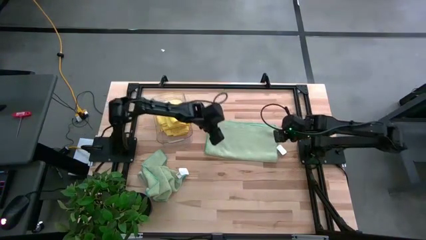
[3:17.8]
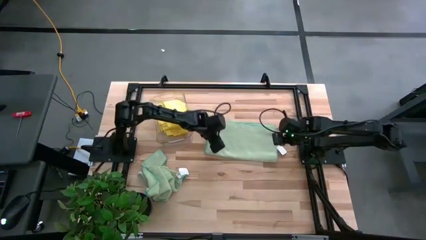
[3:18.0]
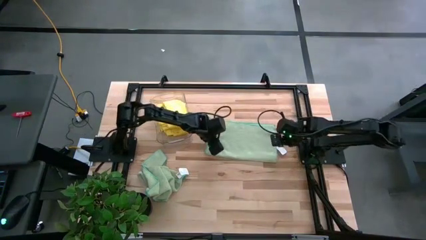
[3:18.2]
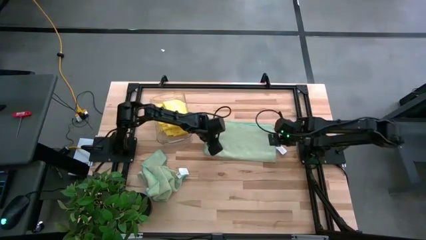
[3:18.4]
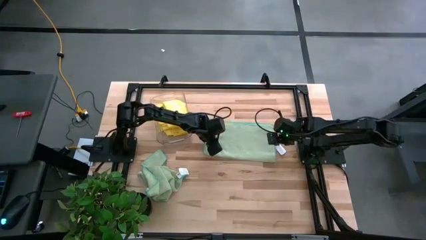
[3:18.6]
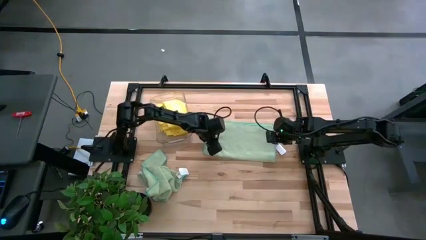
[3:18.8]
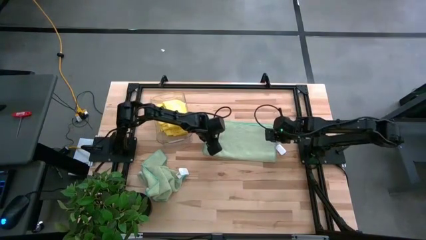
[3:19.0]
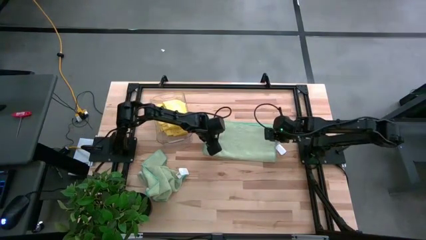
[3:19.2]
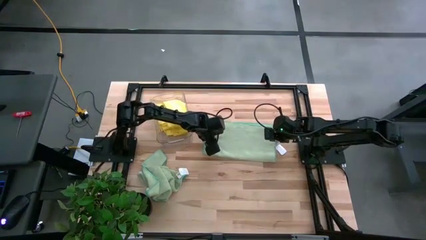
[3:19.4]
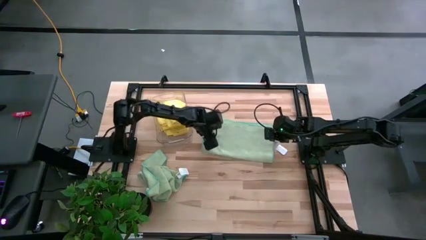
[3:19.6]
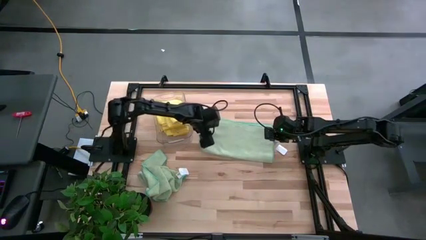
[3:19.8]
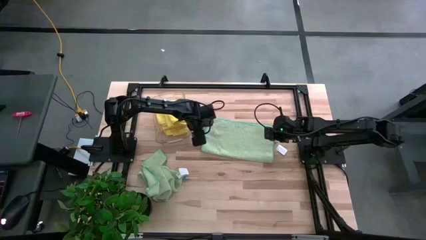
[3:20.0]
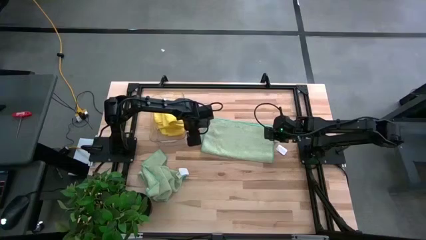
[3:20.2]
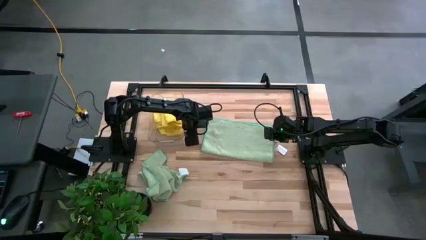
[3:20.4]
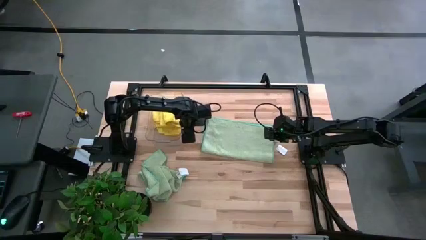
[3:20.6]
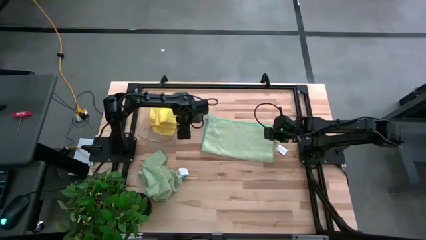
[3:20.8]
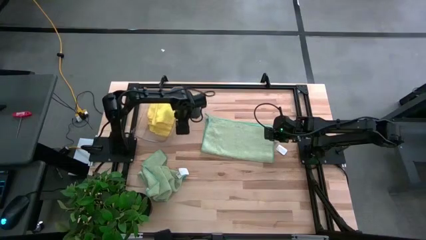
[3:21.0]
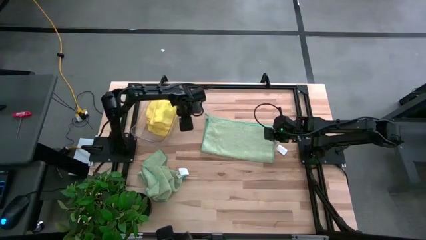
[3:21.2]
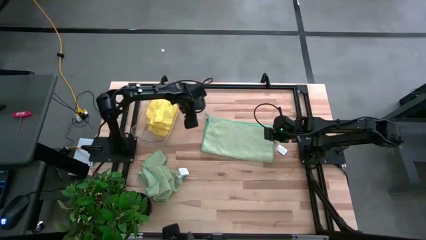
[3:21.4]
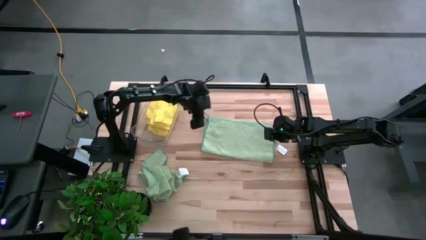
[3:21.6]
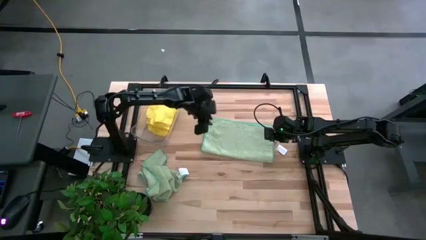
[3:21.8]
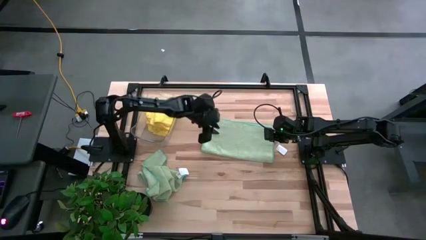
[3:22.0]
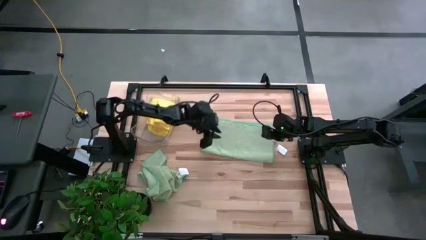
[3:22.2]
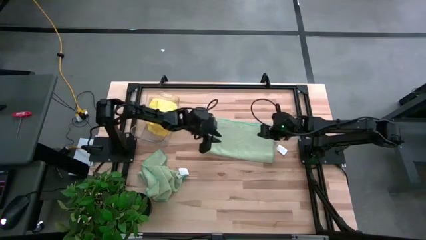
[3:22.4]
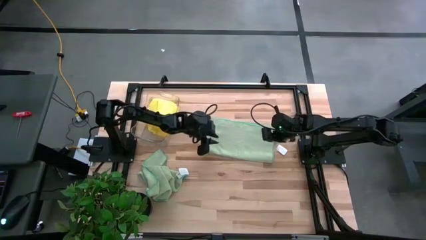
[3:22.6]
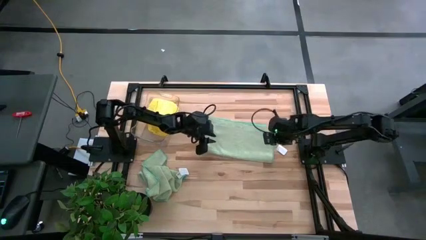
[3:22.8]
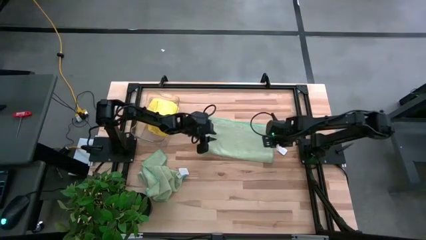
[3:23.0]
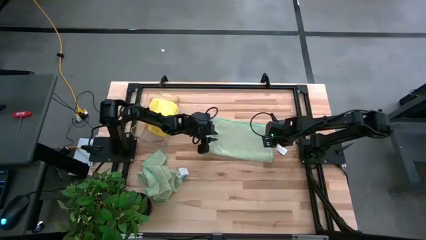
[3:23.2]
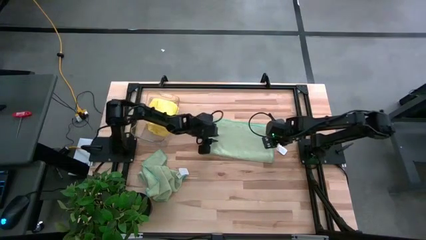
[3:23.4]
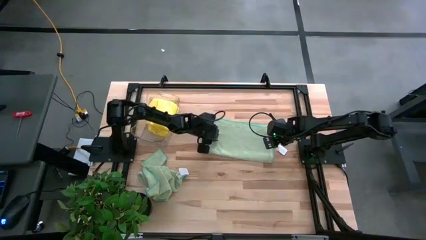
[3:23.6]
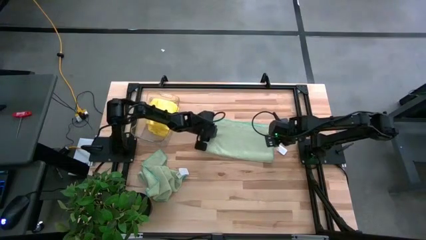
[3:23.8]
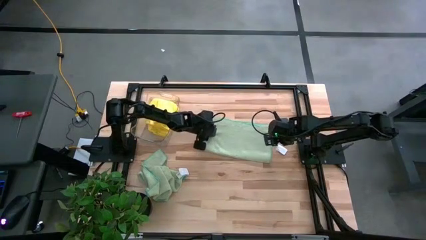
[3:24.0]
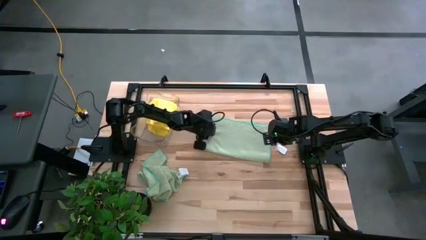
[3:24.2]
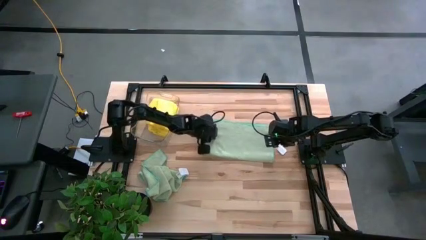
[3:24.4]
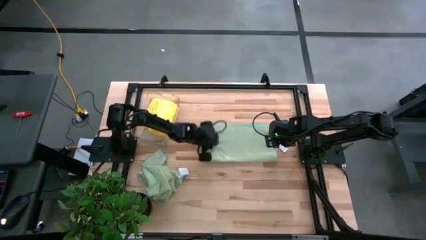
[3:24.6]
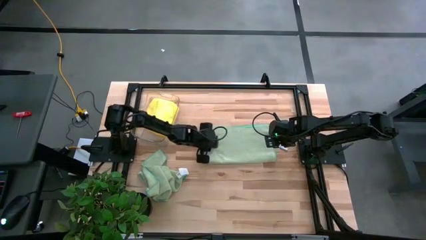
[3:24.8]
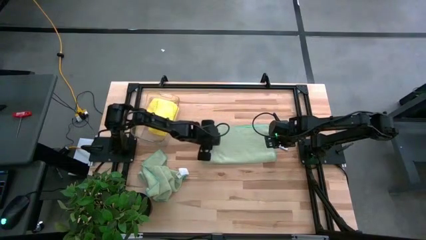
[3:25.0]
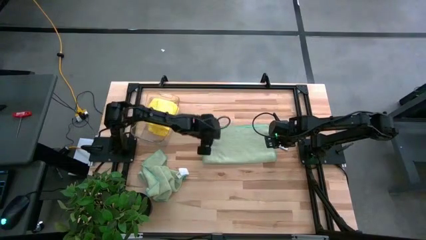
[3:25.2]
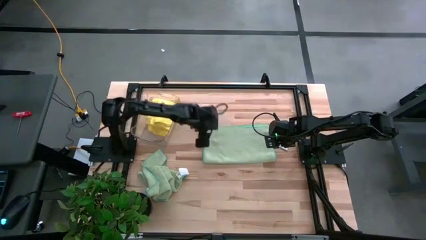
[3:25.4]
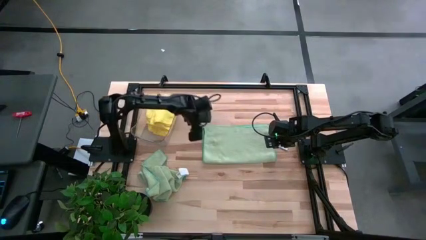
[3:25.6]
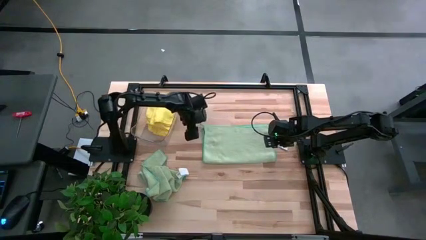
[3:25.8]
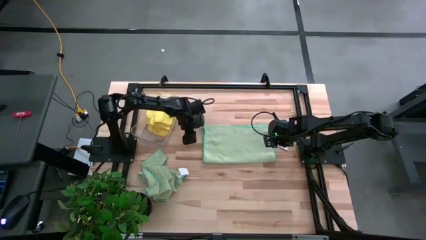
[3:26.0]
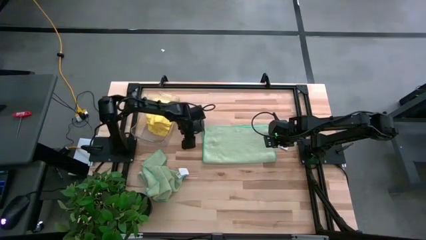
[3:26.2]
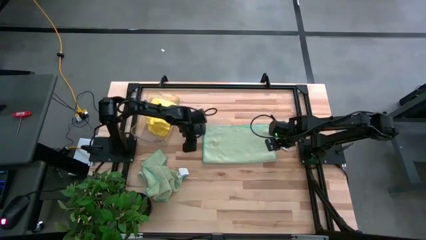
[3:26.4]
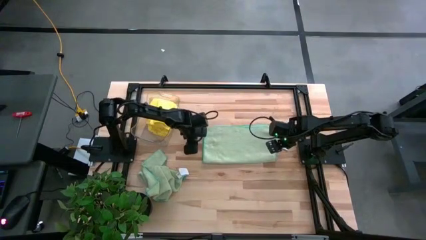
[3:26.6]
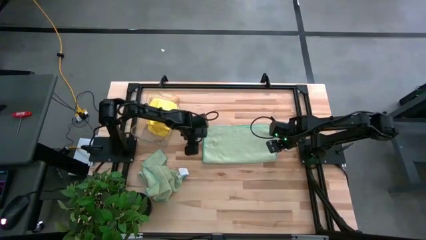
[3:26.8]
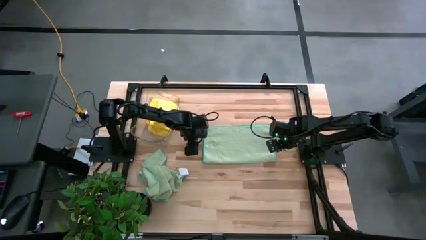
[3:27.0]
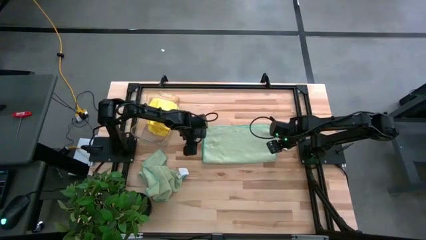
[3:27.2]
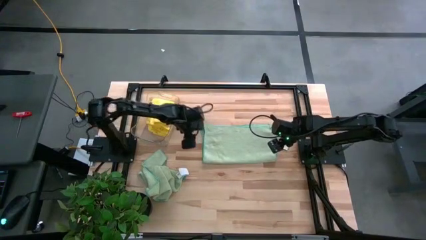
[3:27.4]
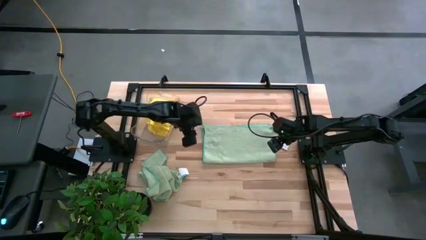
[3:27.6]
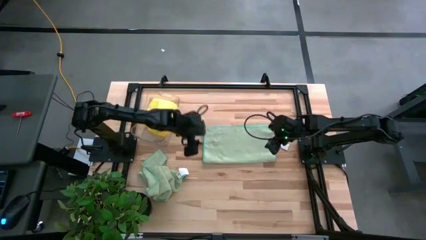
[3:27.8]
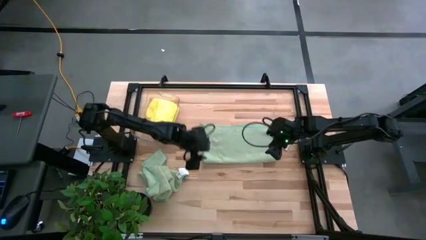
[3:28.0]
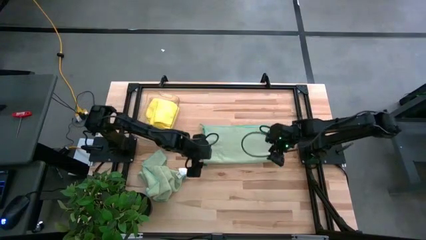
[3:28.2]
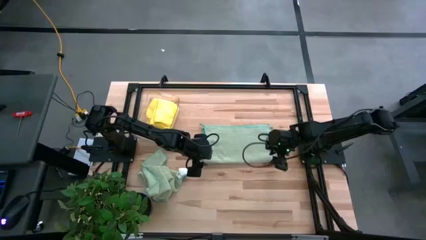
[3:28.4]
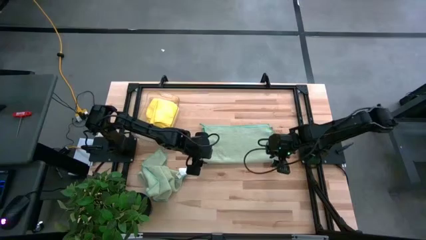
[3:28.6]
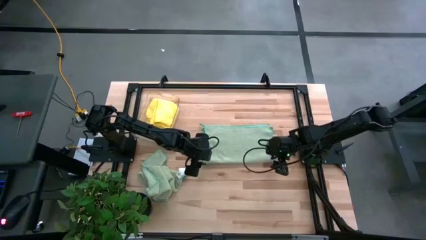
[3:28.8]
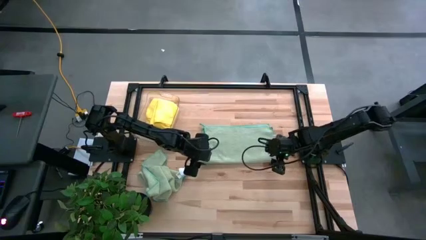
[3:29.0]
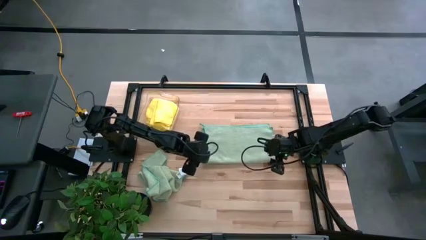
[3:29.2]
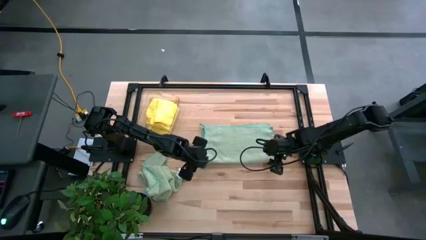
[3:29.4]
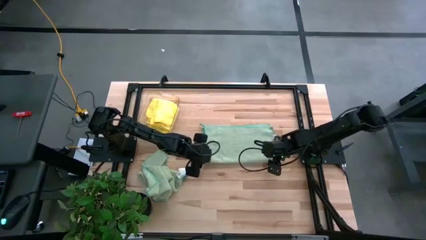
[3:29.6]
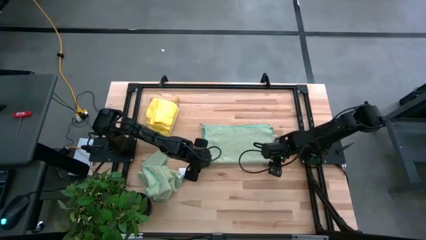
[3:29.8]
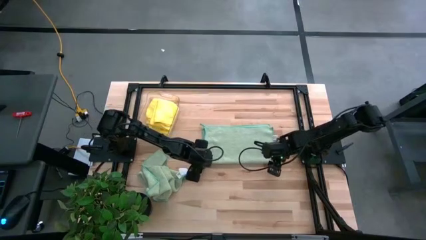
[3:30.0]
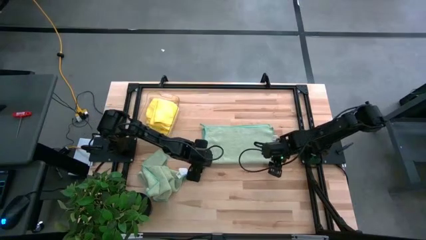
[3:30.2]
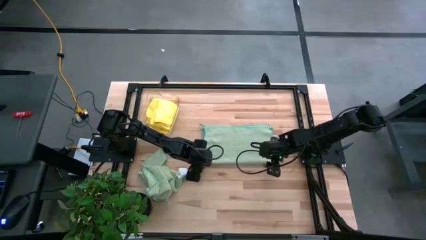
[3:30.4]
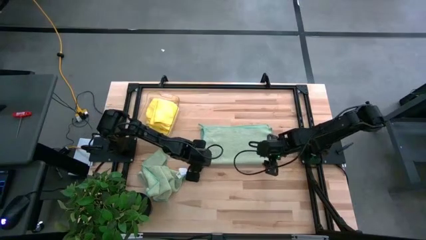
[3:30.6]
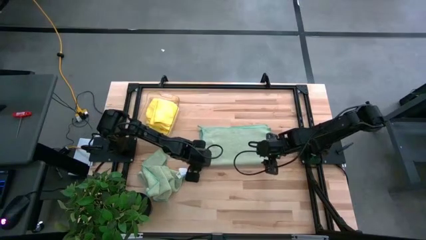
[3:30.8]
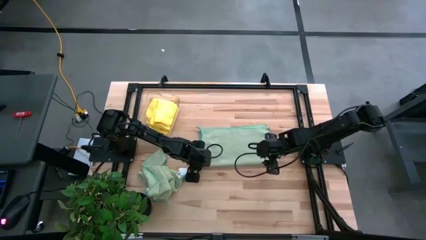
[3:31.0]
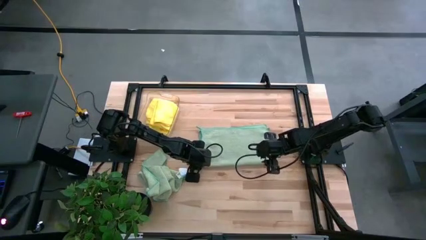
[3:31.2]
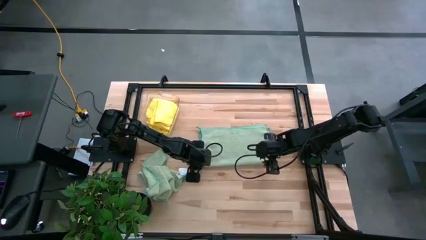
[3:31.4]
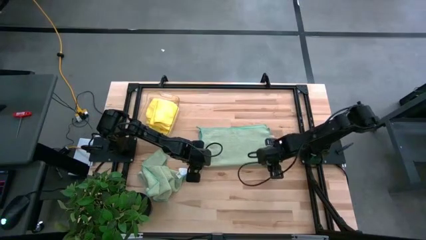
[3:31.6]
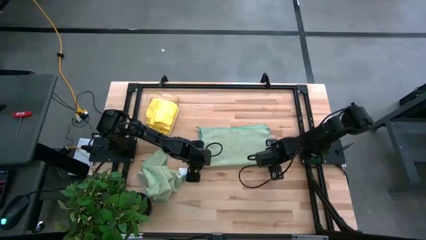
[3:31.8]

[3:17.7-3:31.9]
Task: Fold microfiber towels
Fold the right green towel
